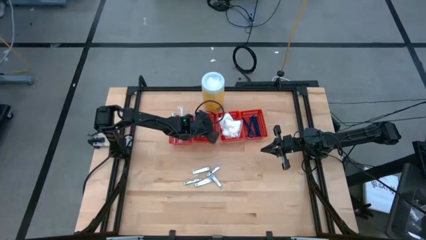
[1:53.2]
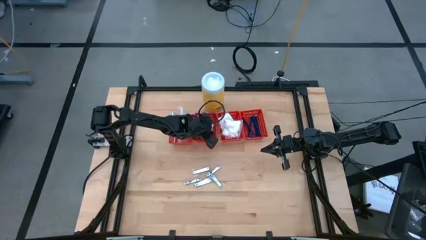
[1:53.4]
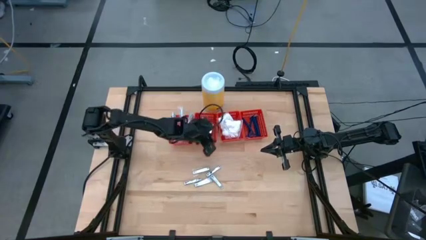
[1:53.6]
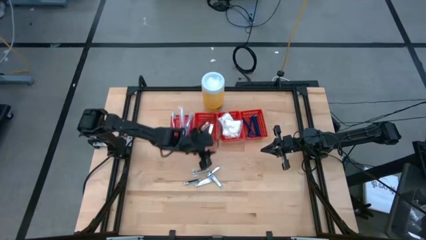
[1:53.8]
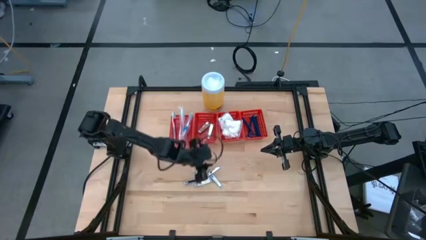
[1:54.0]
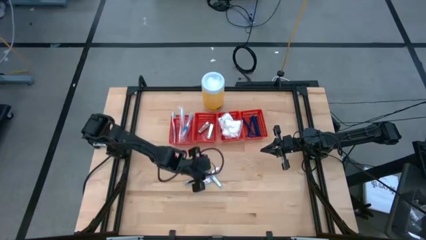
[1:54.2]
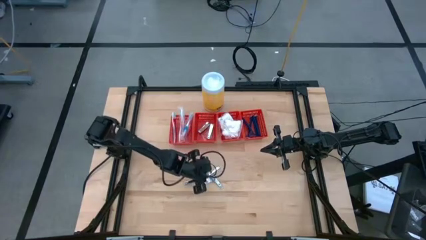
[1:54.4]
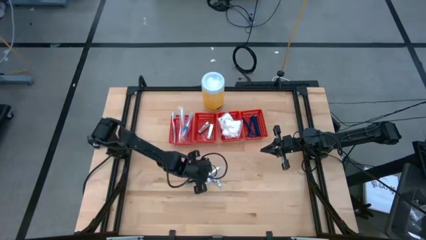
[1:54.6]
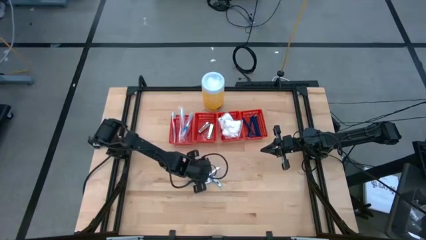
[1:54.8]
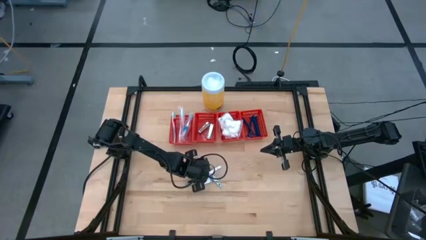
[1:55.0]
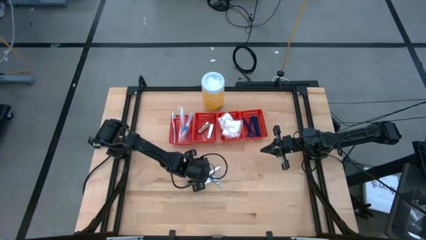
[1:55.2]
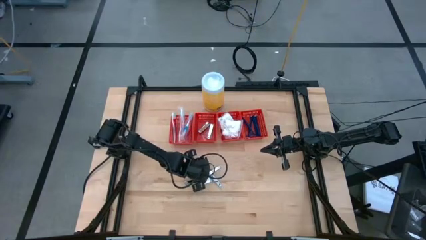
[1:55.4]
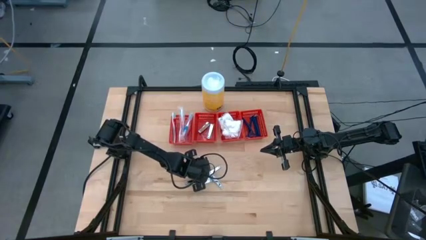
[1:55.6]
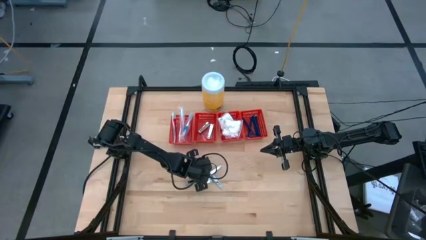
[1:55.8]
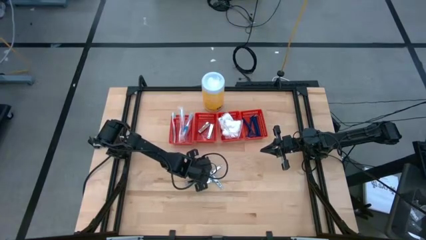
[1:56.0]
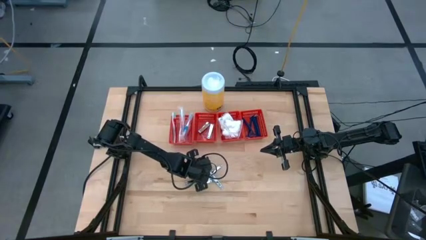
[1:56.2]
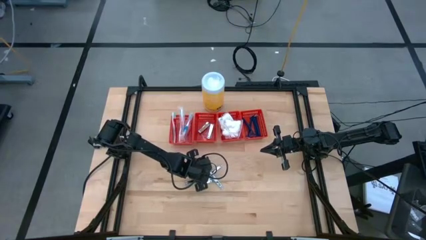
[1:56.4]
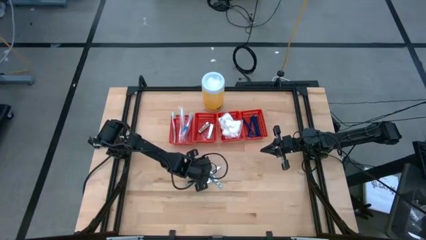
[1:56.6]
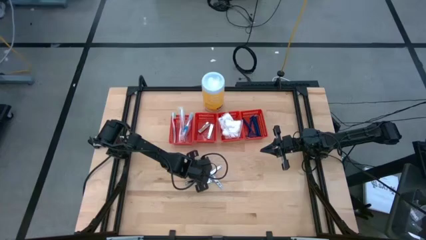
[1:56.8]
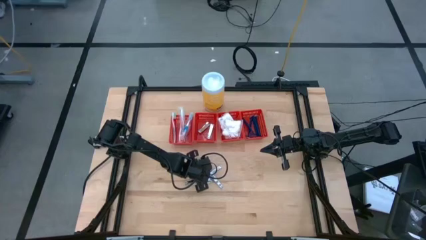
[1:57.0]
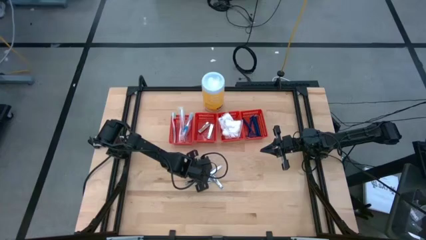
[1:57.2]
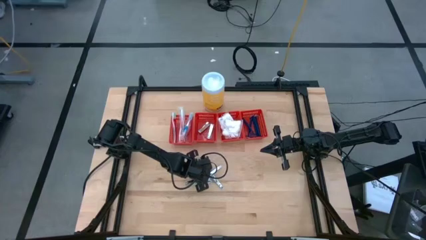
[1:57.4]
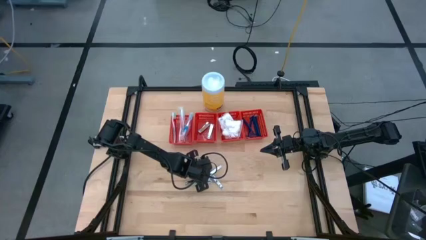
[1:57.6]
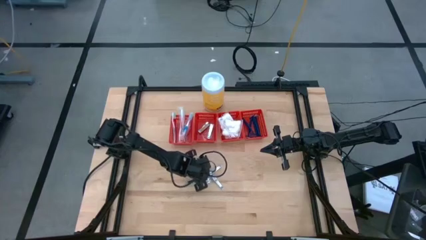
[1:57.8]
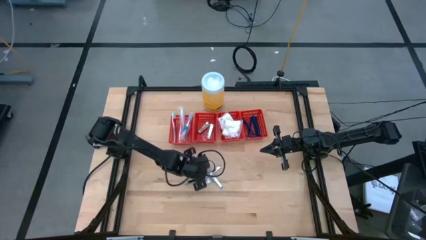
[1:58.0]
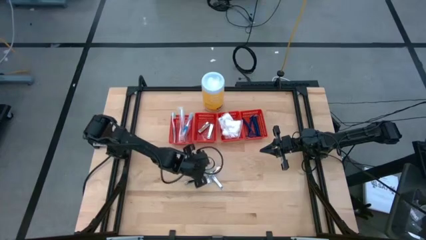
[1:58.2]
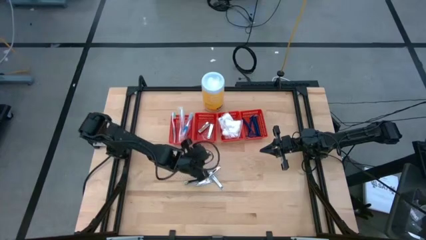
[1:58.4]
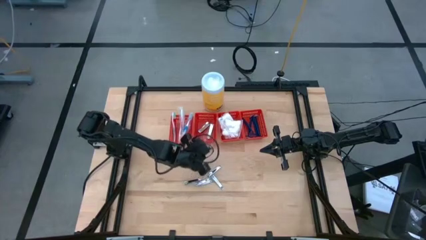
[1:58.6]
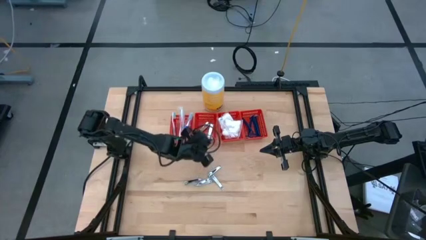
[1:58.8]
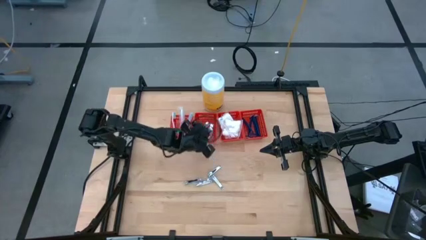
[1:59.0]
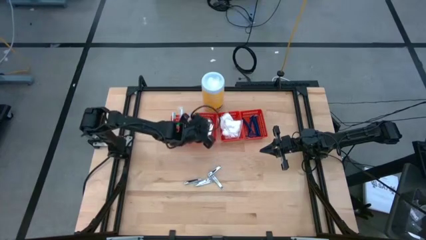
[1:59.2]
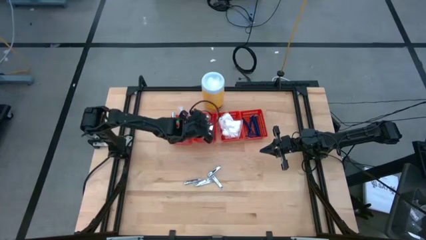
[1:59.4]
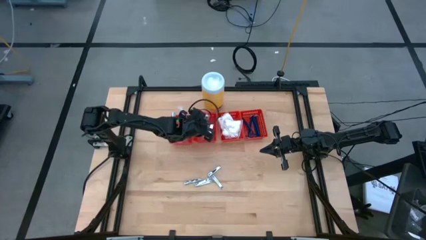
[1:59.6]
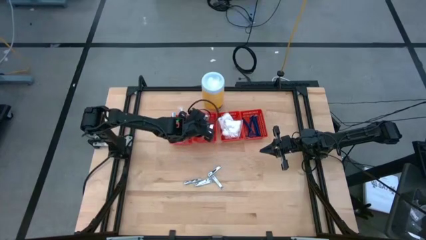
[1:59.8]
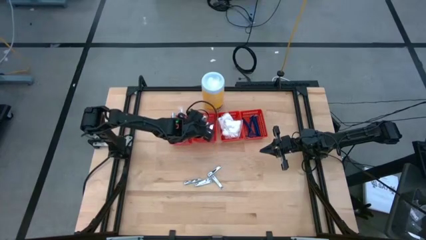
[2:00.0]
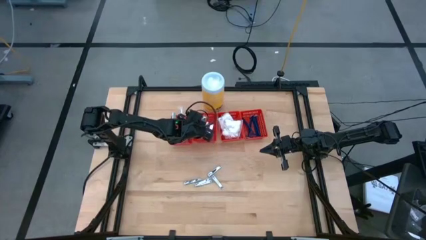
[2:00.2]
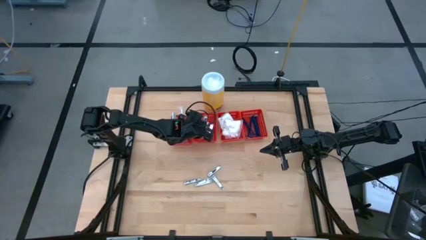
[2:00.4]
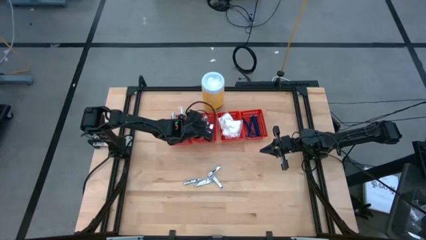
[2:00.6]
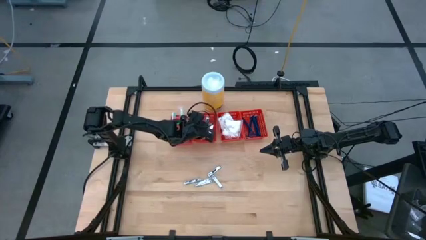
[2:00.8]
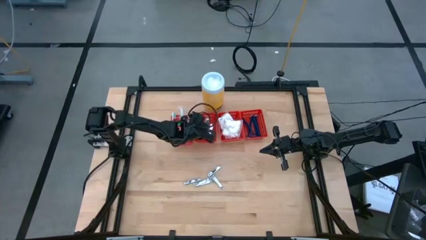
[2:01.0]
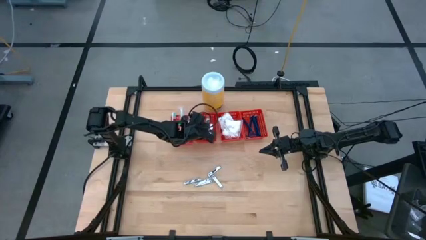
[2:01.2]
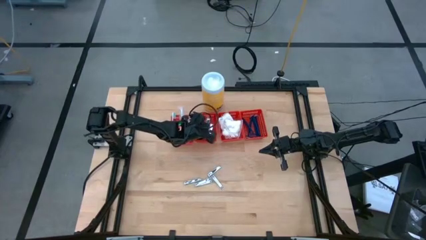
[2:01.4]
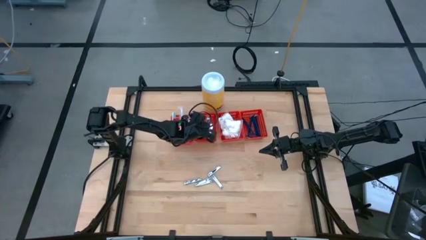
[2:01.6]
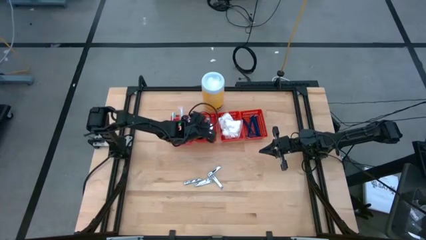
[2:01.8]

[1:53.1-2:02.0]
Task: Pick & Place Travel size toiletries
Put the silver nail clippers into the middle left red basket

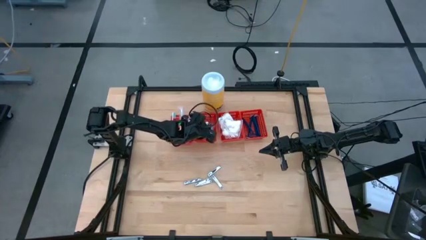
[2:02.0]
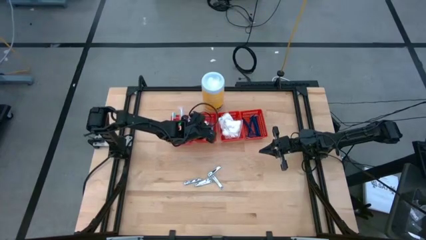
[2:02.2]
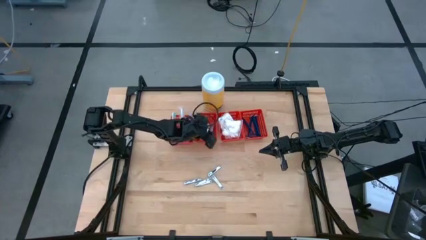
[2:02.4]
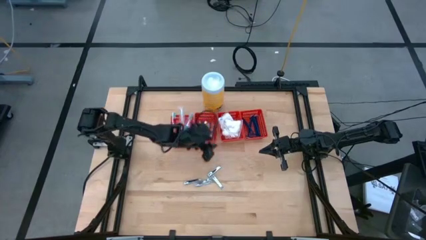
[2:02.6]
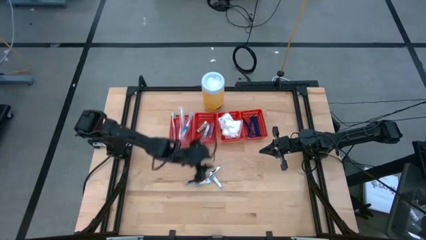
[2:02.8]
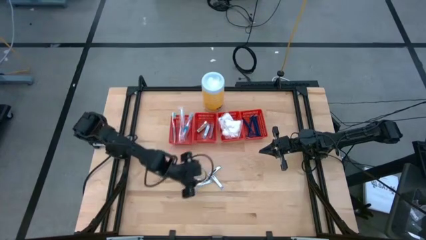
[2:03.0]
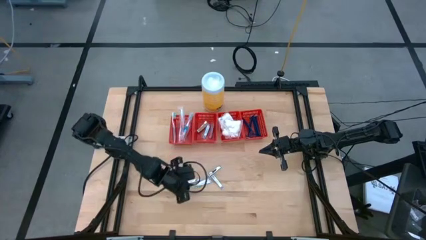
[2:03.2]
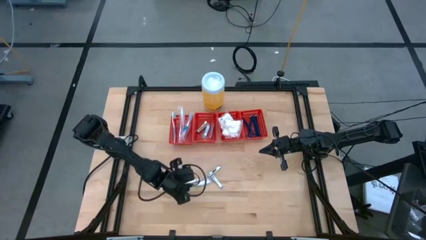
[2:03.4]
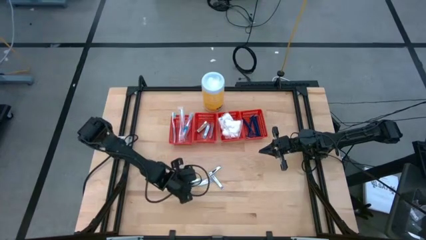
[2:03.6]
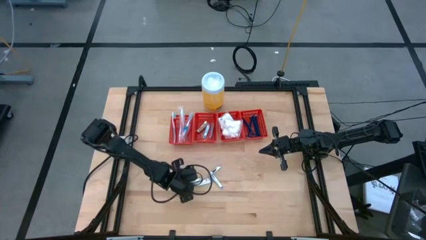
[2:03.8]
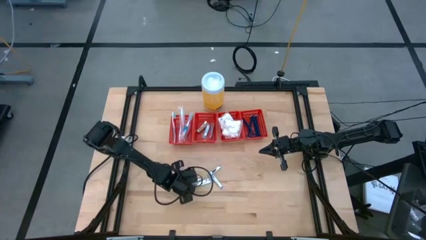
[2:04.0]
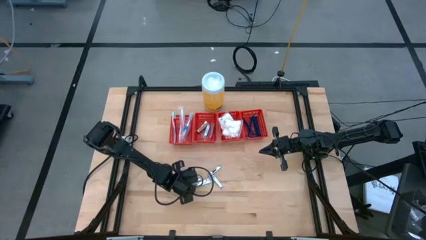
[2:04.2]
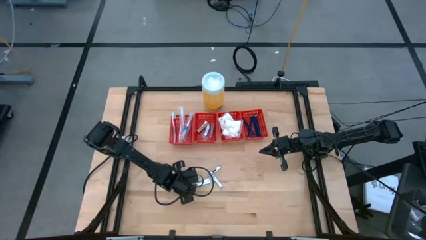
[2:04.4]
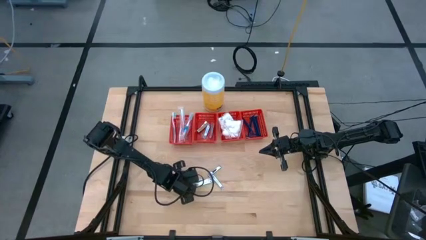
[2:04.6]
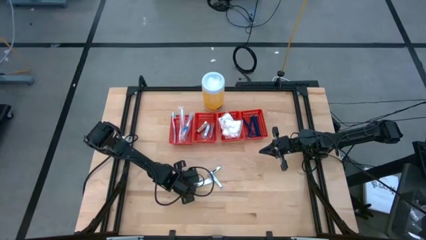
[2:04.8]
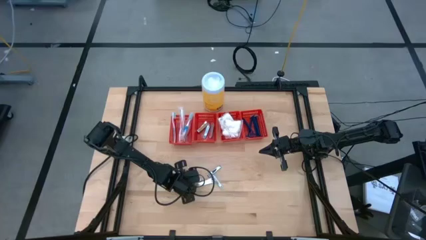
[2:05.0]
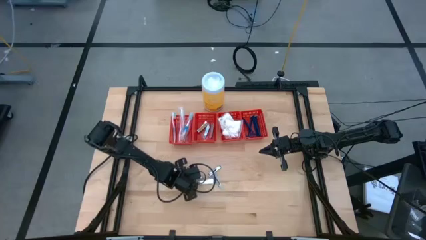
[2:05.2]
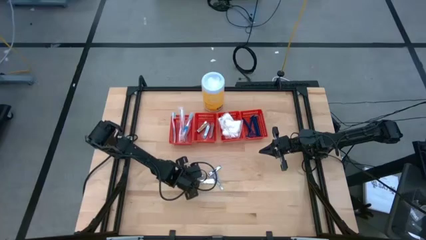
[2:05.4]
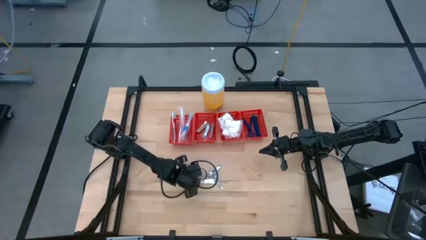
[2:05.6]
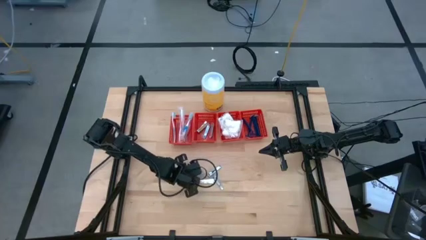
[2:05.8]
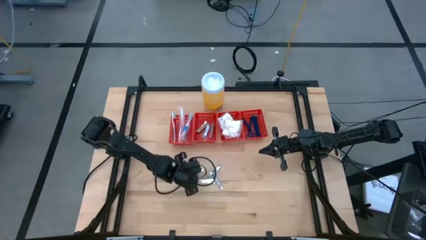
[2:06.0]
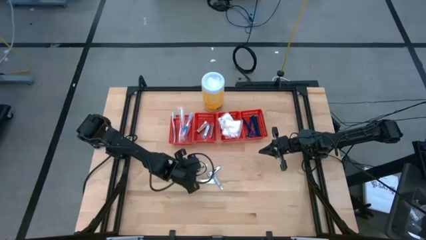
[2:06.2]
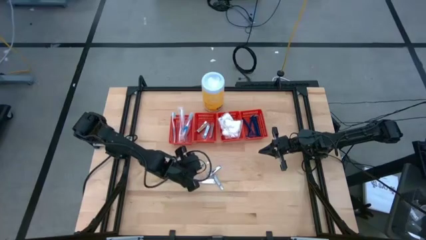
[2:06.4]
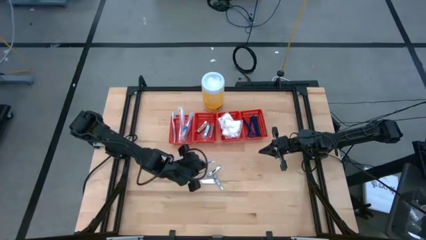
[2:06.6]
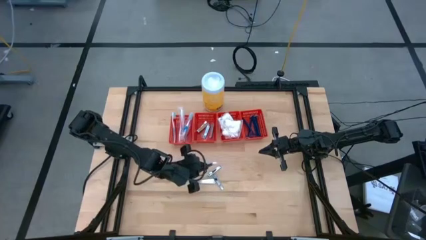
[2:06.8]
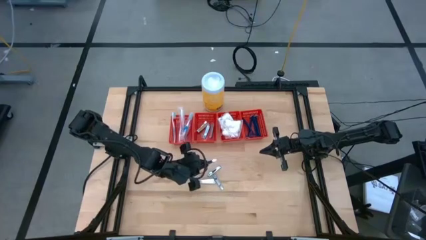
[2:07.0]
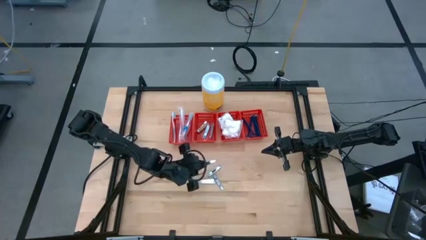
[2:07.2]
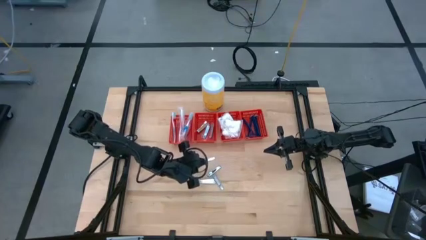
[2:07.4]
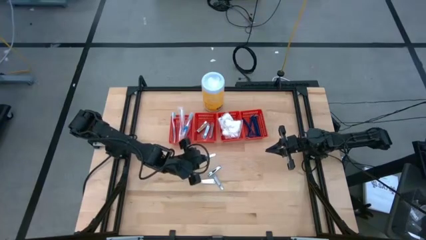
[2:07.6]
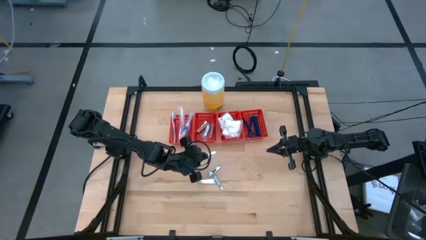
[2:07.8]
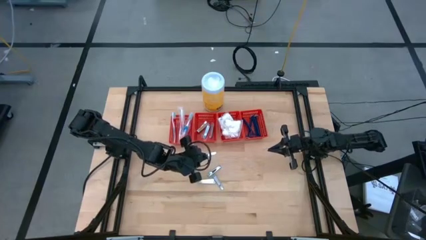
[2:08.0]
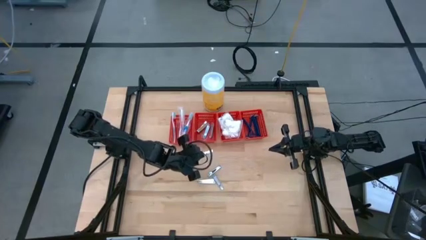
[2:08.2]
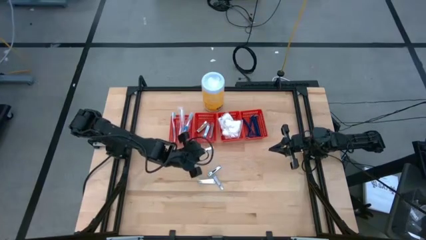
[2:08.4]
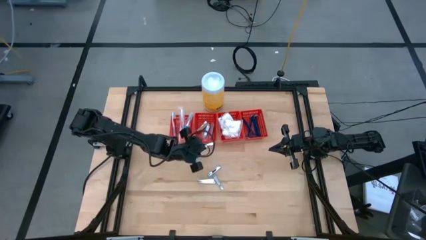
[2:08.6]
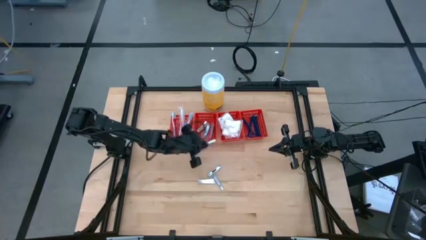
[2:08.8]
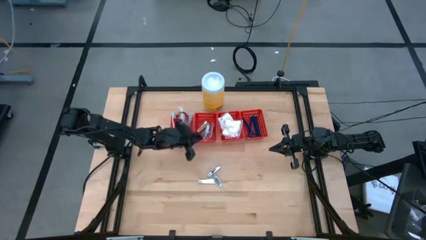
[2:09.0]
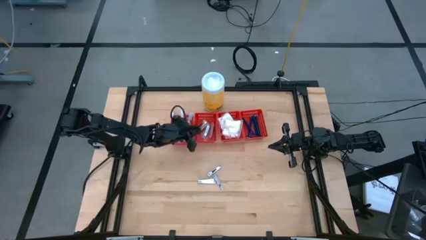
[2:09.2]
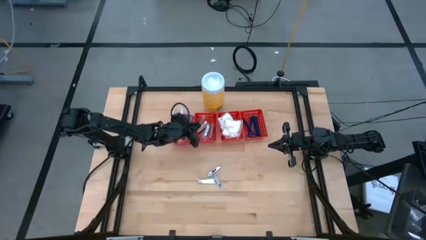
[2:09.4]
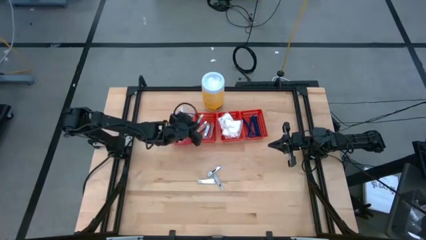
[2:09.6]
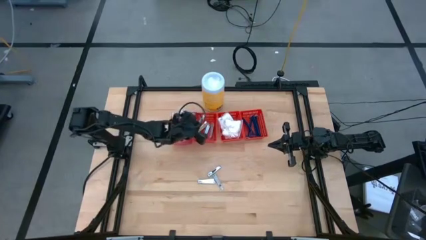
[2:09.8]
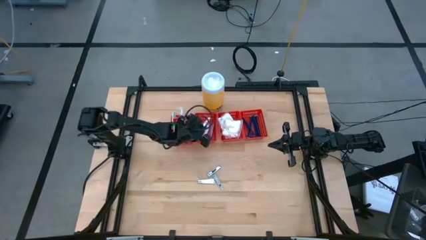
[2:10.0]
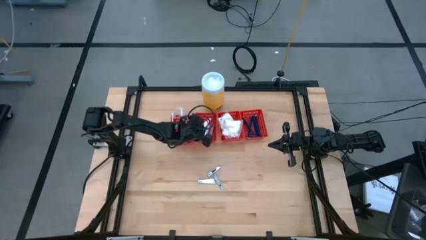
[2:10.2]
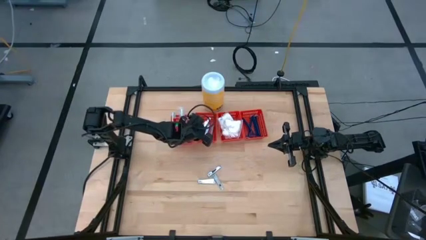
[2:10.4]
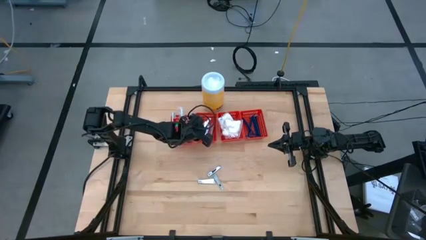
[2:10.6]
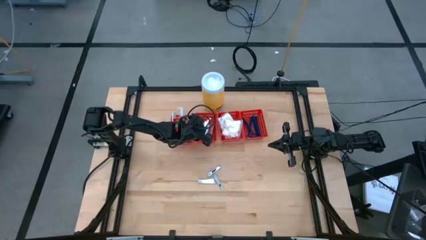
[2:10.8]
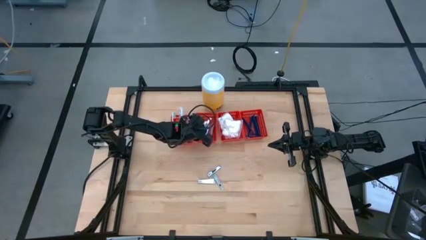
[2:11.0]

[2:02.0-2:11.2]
Put the silver nail clippers into the middle left red basket
